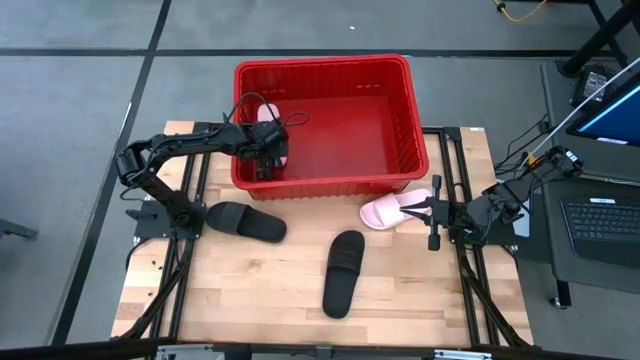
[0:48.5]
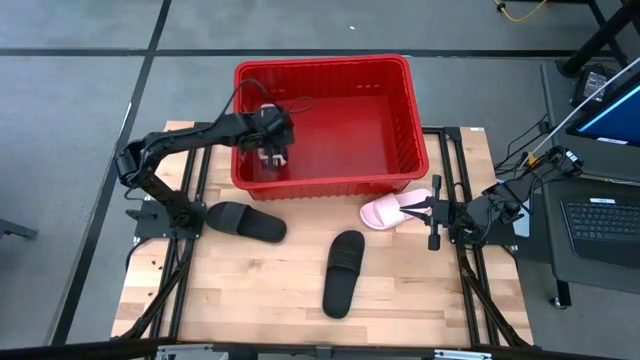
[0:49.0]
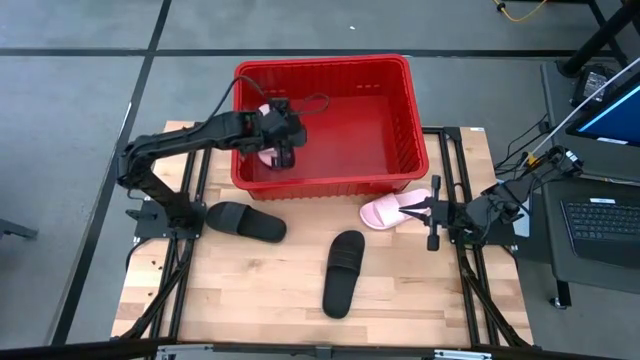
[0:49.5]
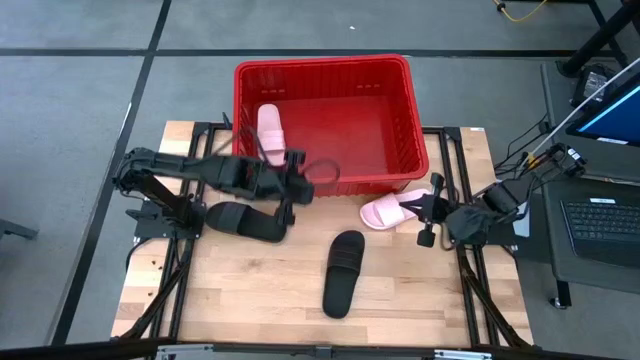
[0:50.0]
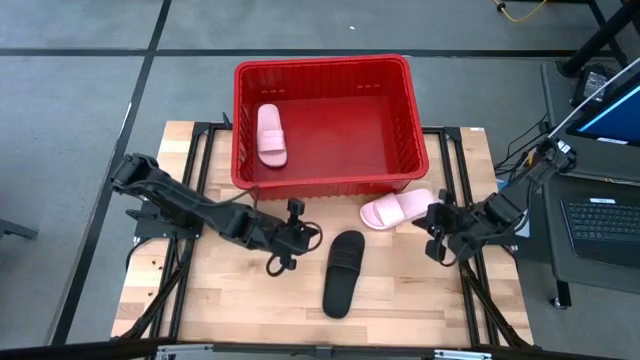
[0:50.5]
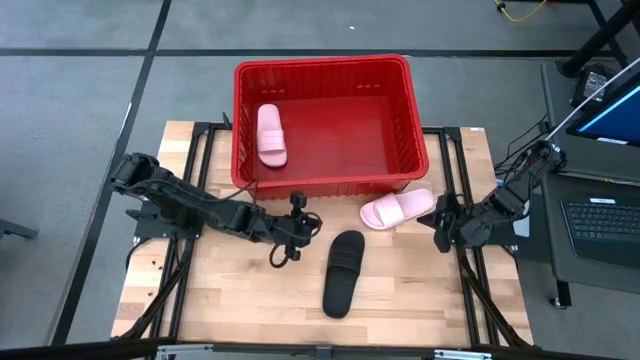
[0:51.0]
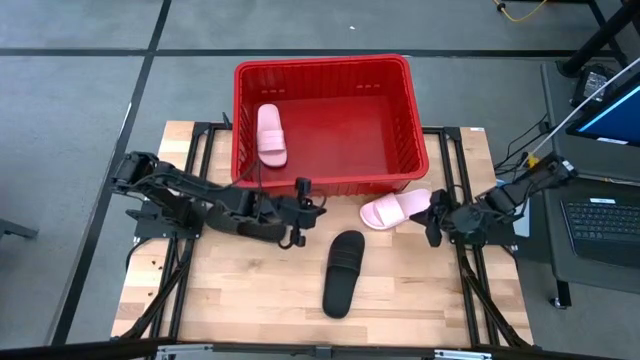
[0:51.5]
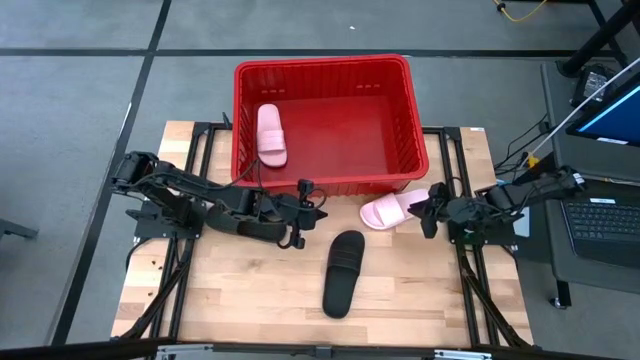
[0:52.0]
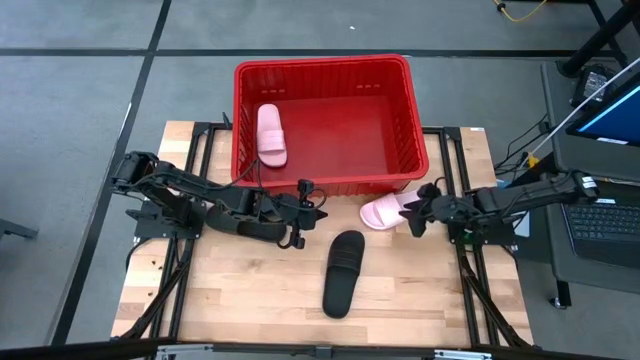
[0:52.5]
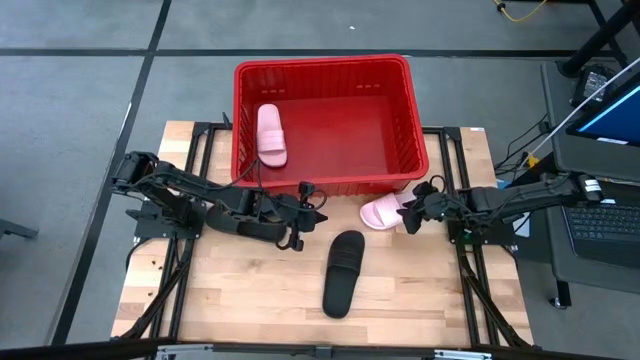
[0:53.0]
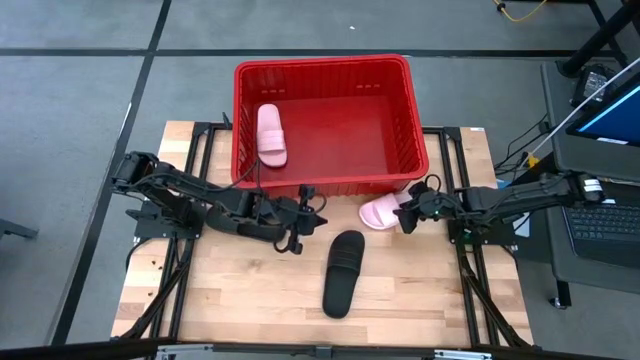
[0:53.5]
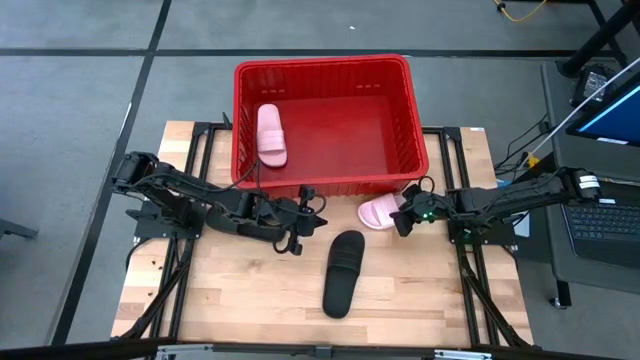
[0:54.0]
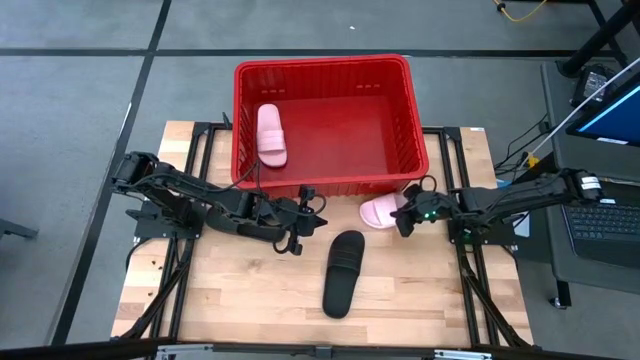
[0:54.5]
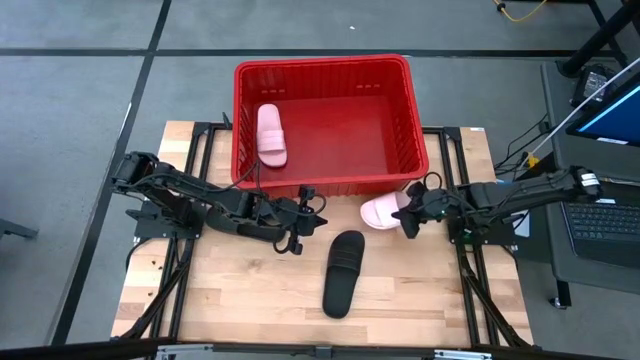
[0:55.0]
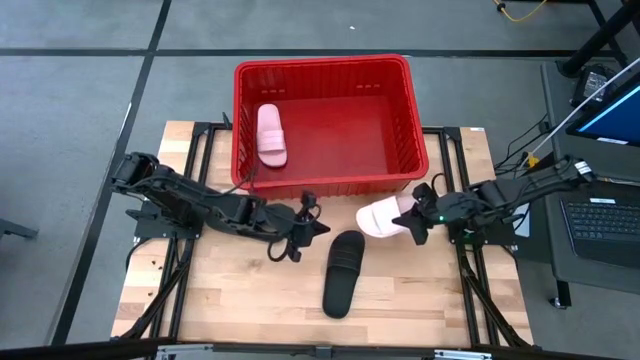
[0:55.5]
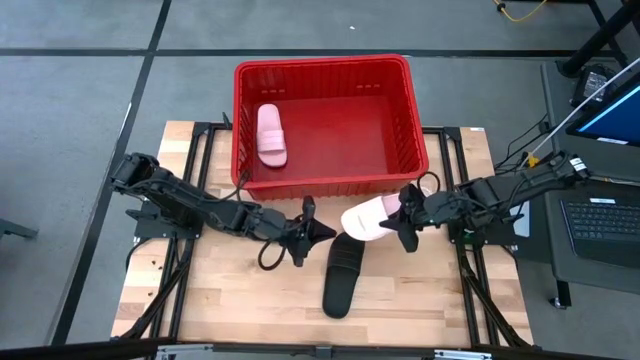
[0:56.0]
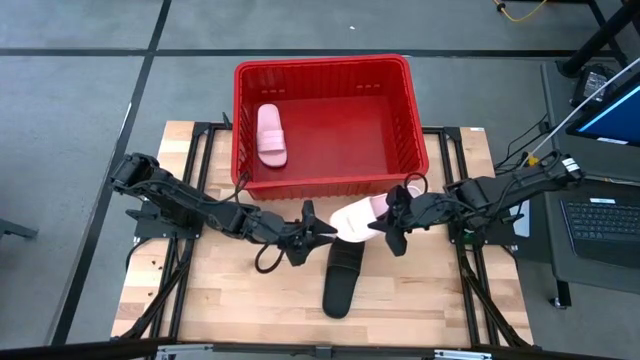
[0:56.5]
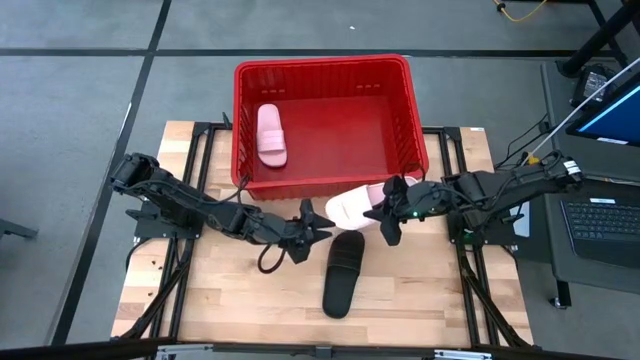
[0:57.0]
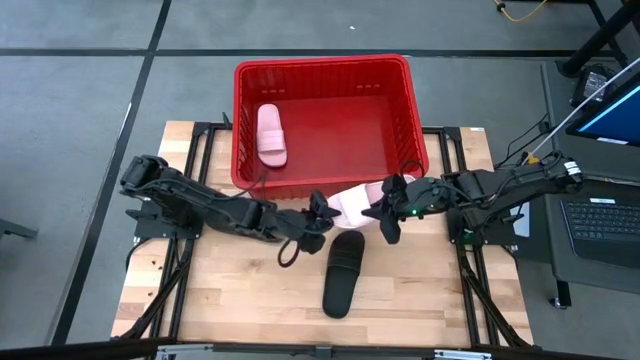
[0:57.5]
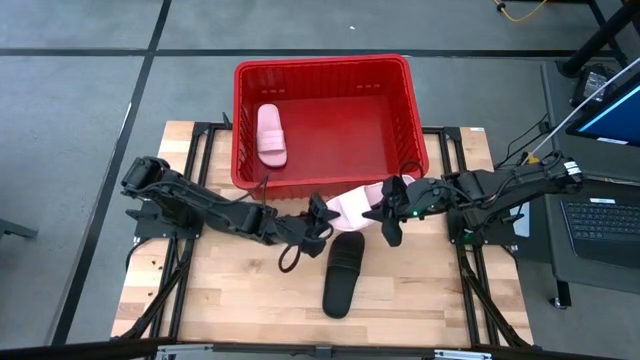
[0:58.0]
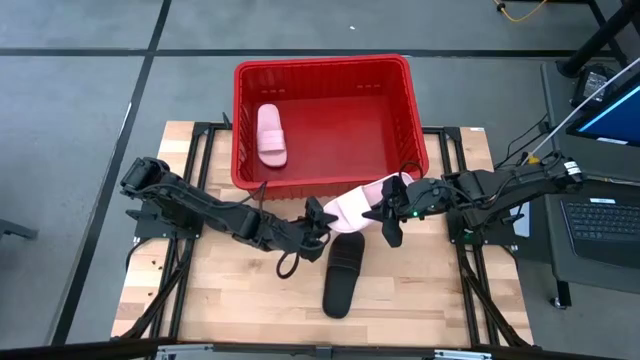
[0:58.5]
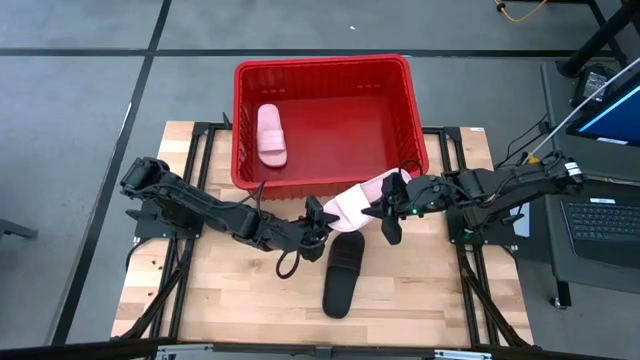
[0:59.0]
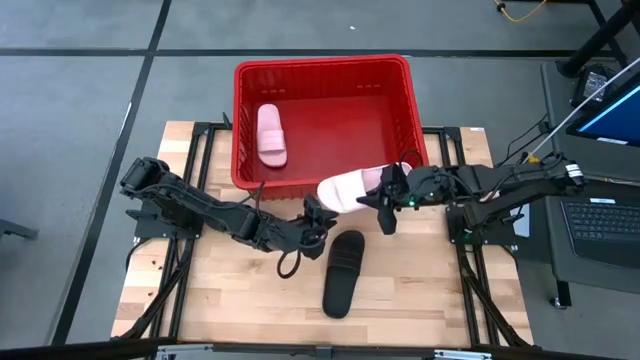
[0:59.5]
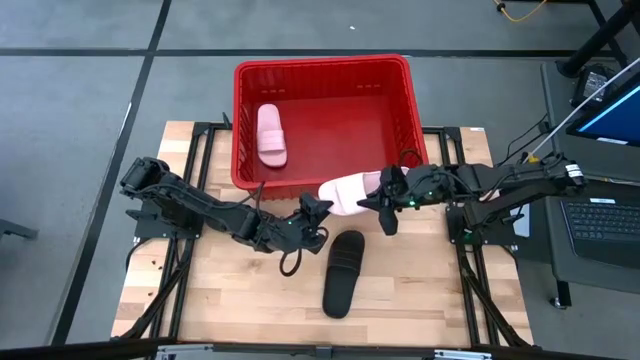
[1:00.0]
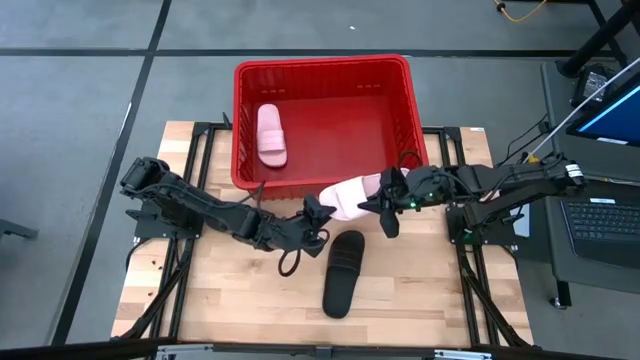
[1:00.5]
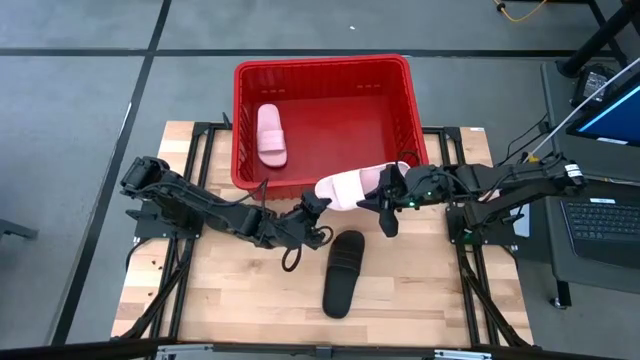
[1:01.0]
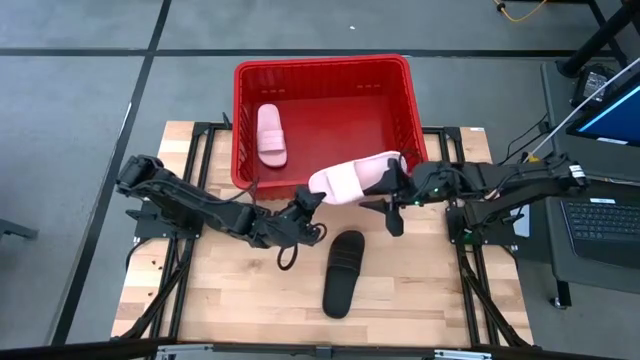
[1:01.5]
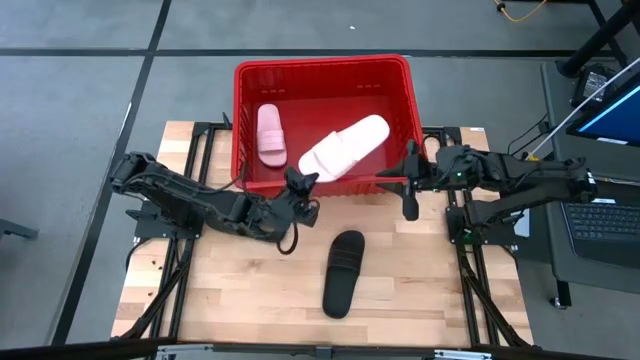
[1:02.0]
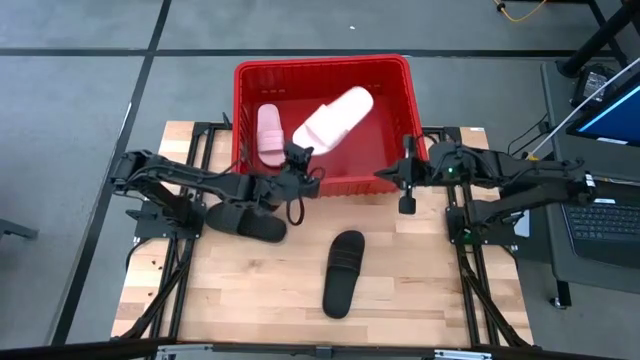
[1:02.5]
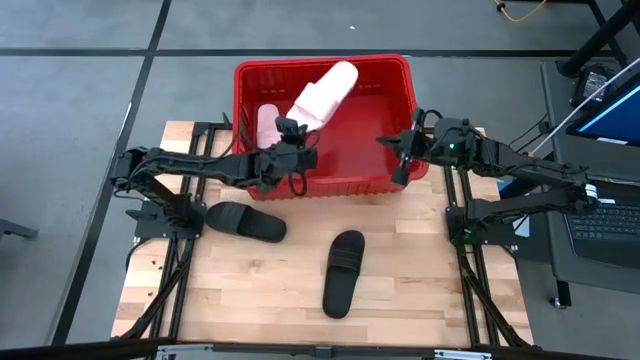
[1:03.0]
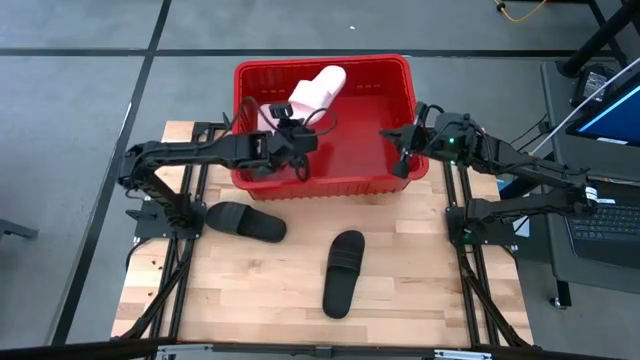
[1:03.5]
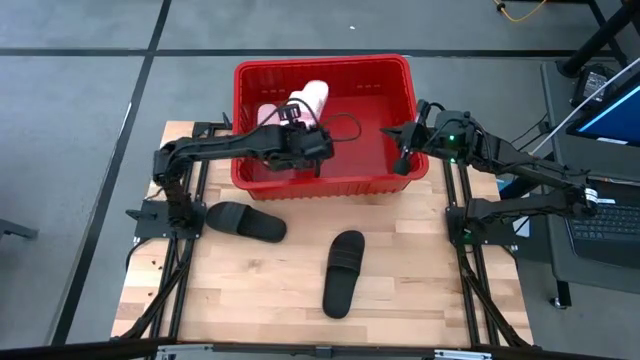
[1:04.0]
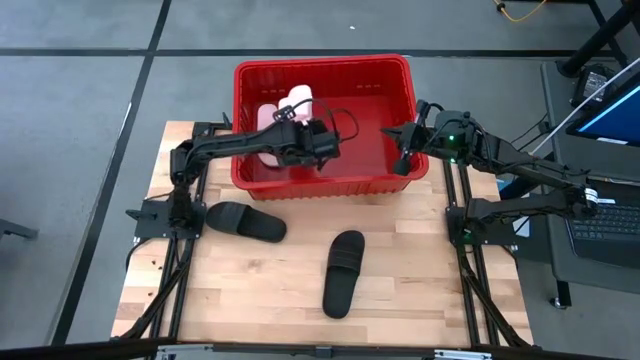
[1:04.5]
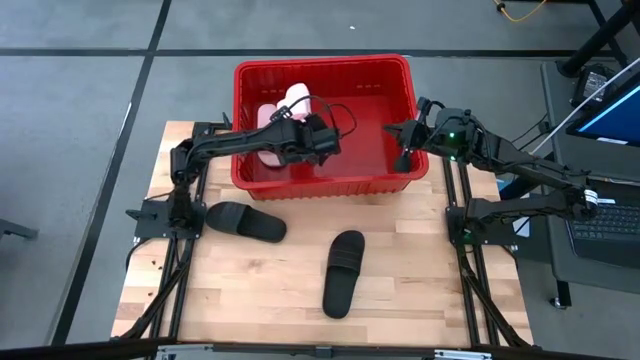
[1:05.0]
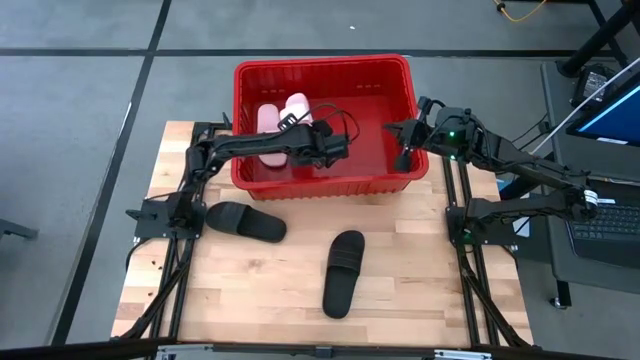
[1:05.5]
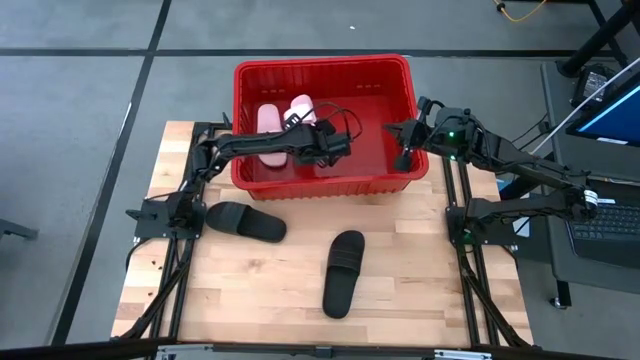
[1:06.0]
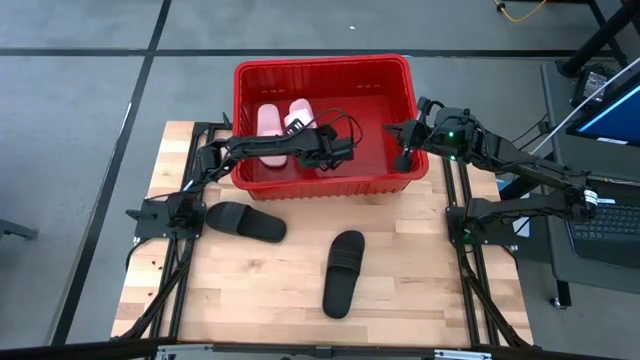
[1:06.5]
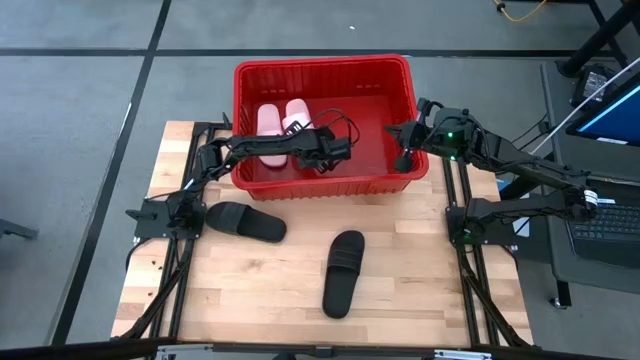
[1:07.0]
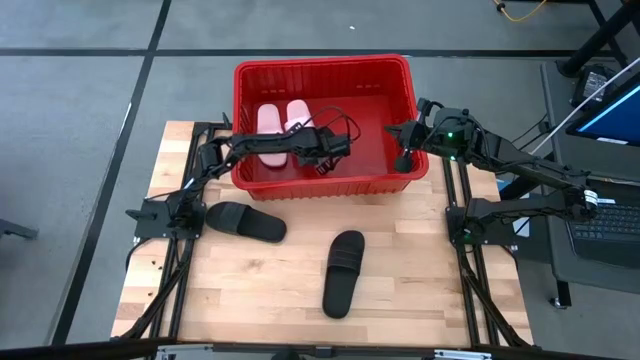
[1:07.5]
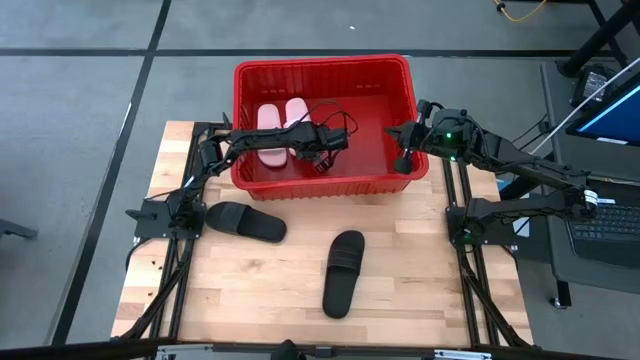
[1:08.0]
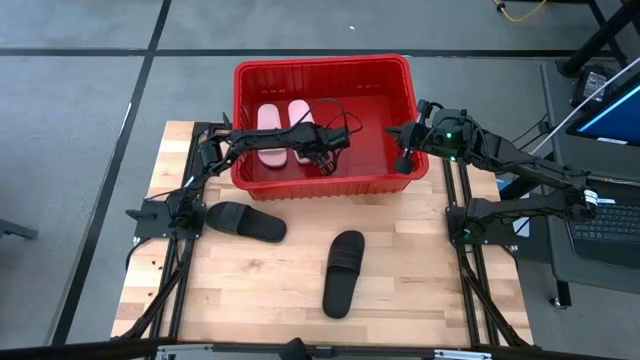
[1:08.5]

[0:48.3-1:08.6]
Task: Pick and place slides into bin
Put the pink slide into the red bin
